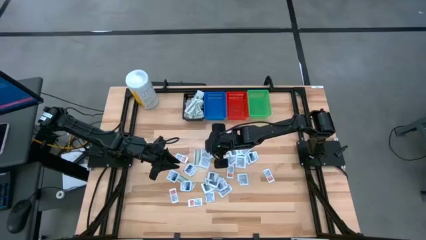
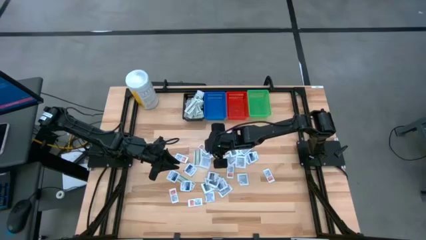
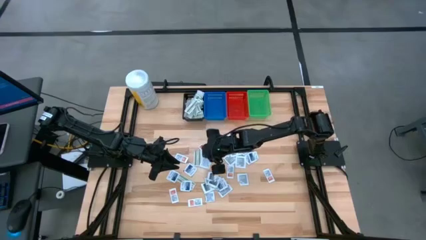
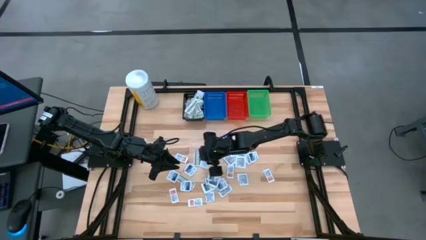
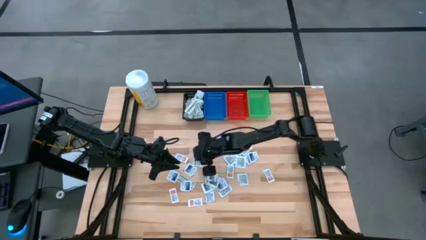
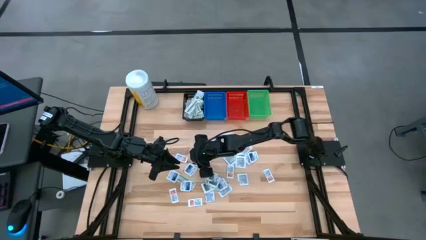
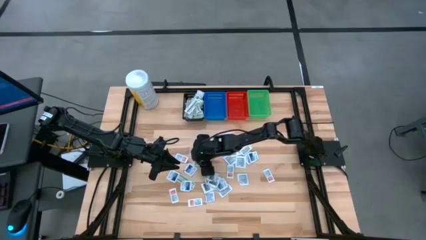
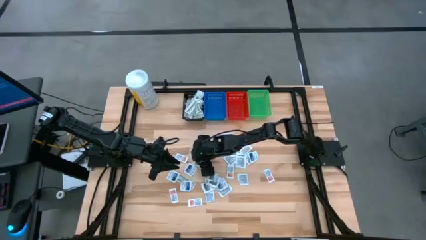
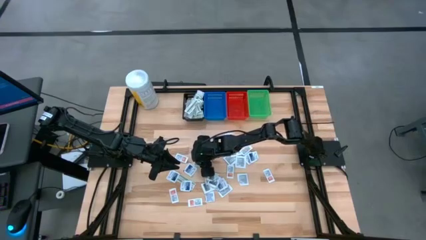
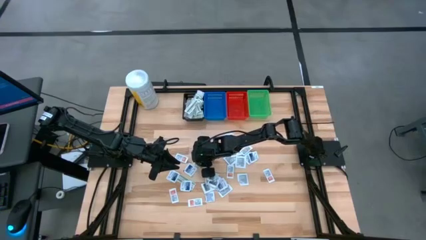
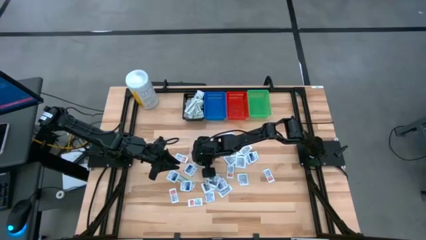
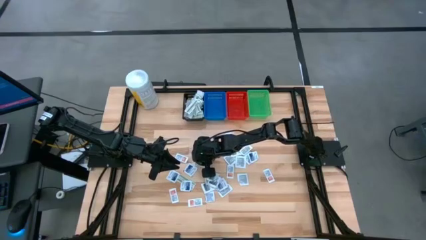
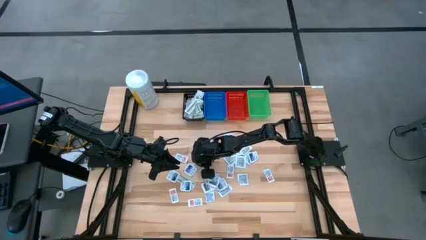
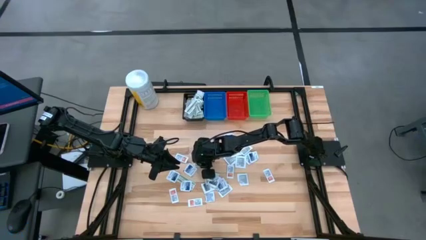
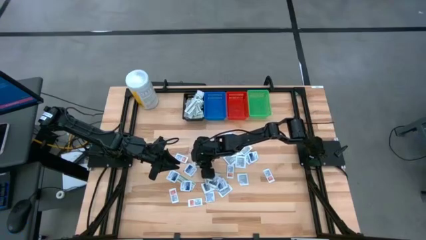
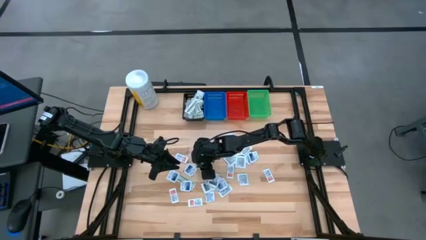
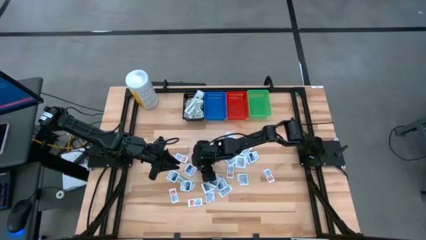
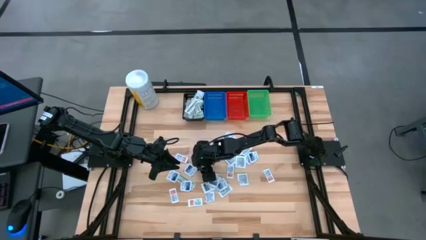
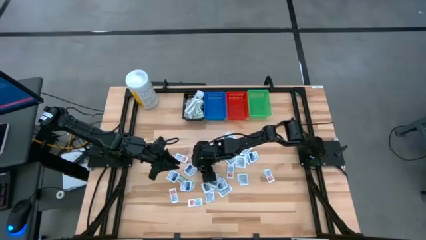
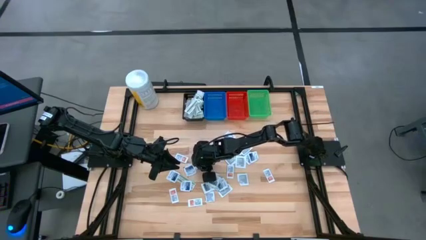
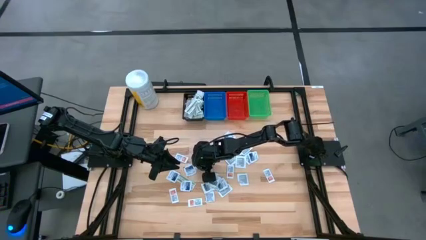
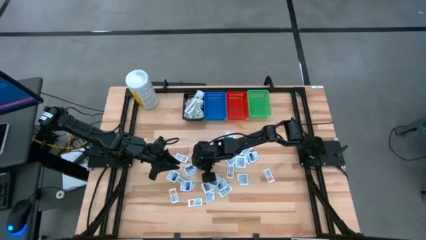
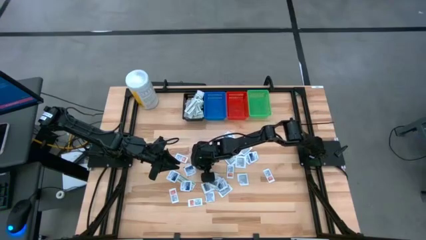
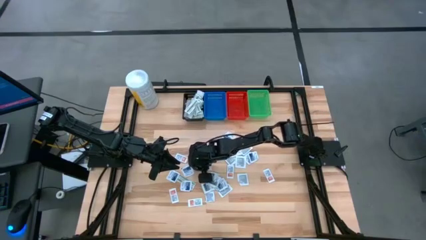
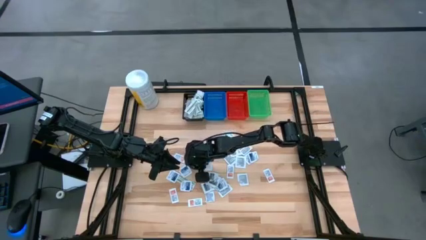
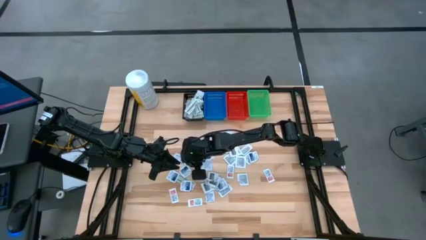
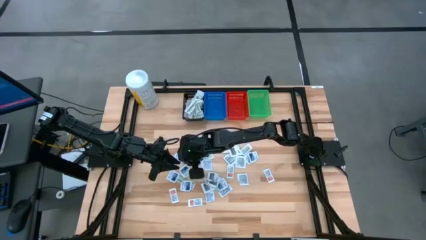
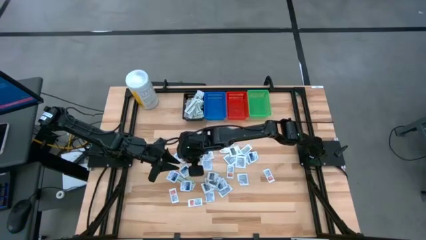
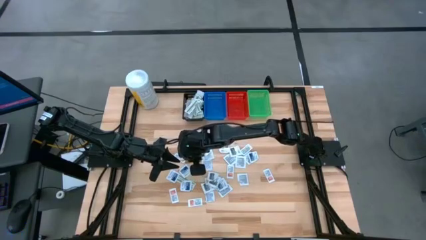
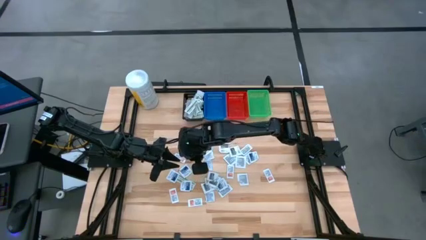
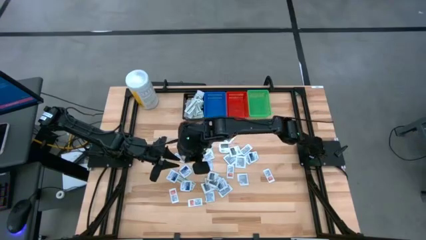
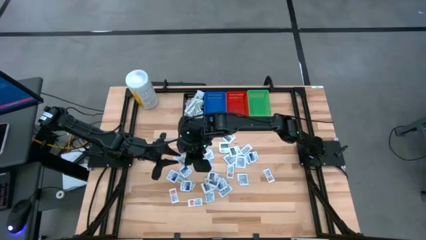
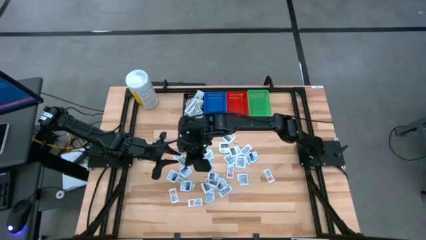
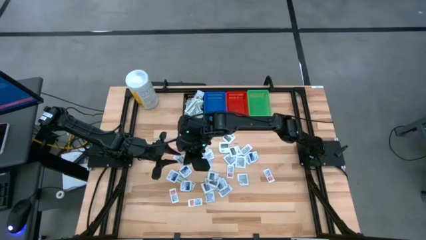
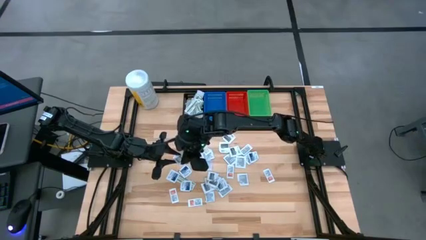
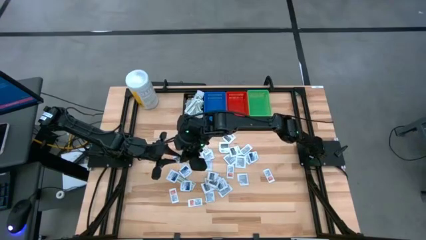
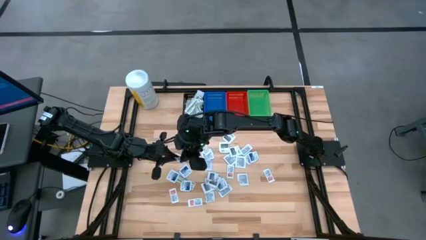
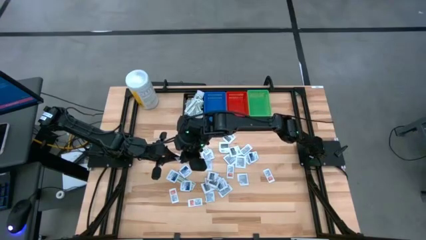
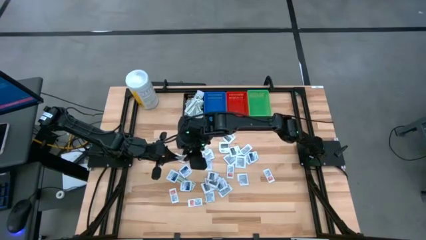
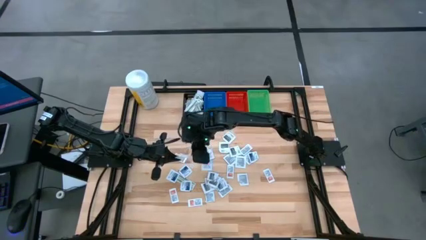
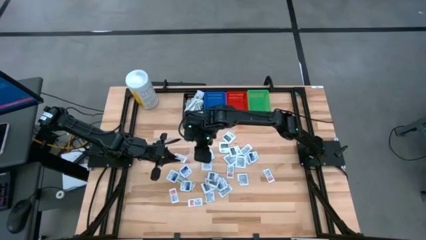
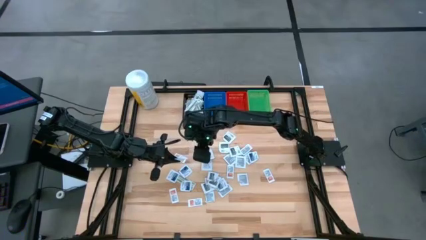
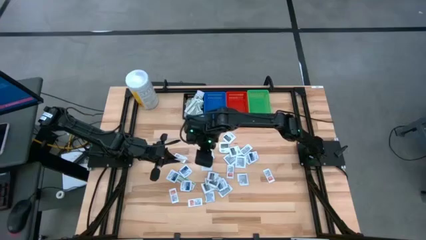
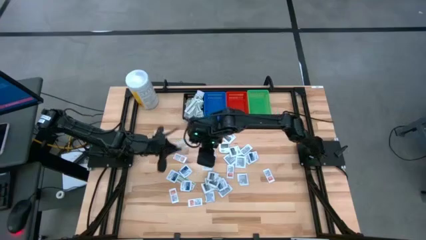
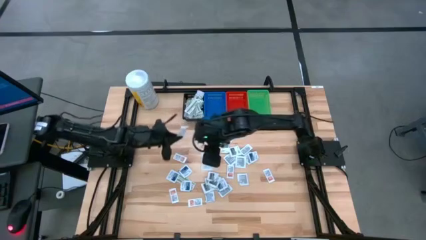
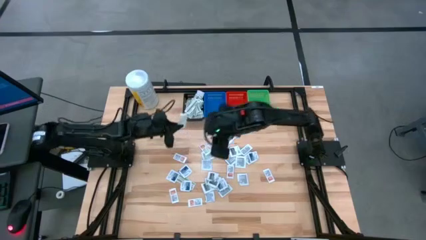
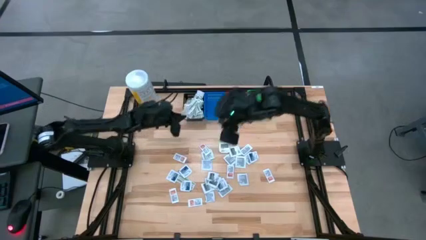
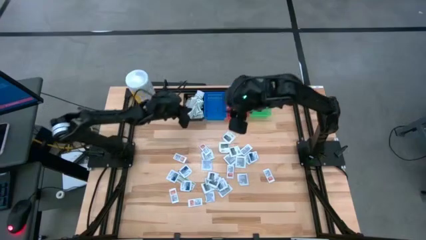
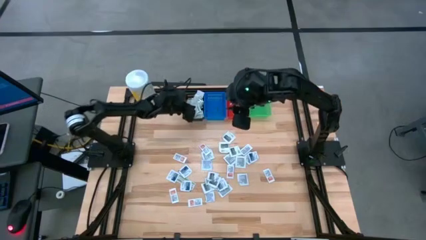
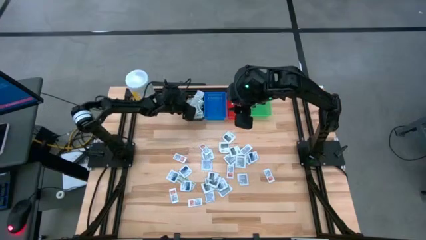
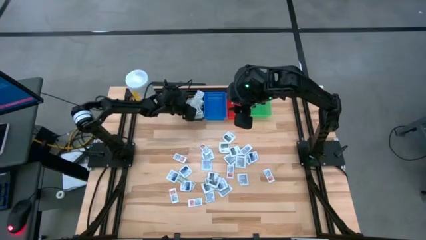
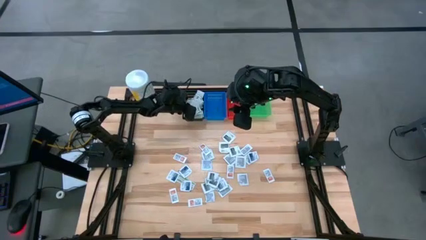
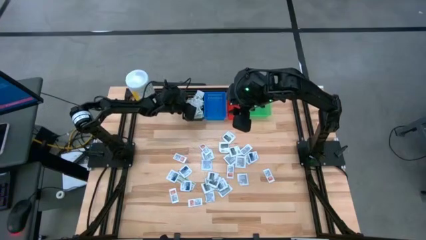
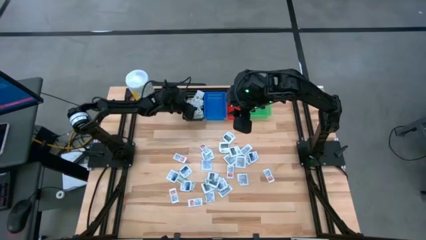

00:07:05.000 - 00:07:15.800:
Task: Pick & Place First Aid Supplies
Put the green bandage pack in the black bin
